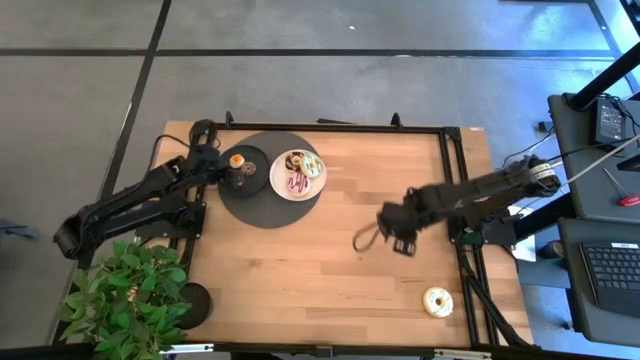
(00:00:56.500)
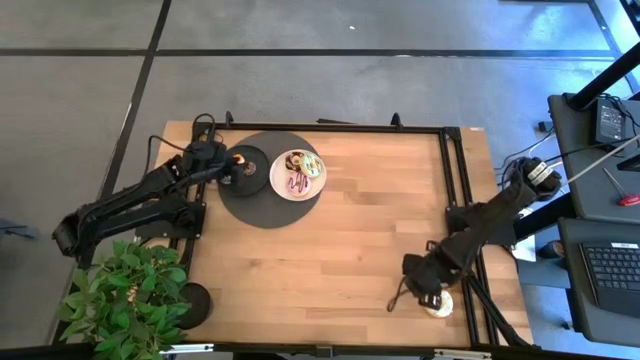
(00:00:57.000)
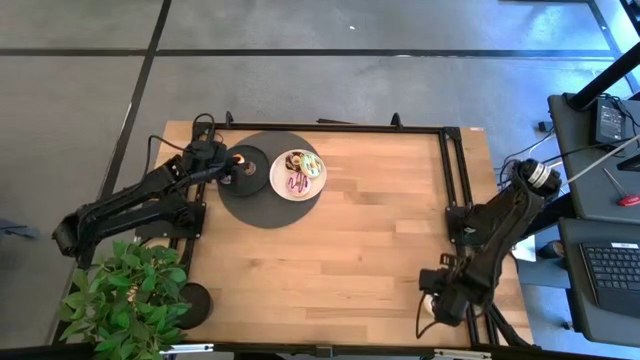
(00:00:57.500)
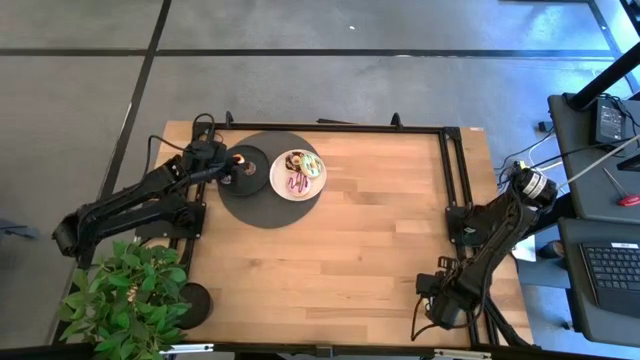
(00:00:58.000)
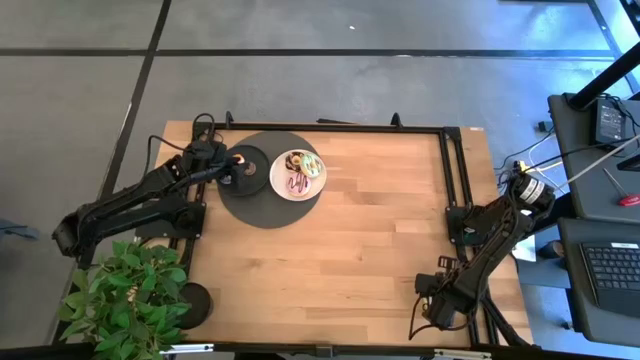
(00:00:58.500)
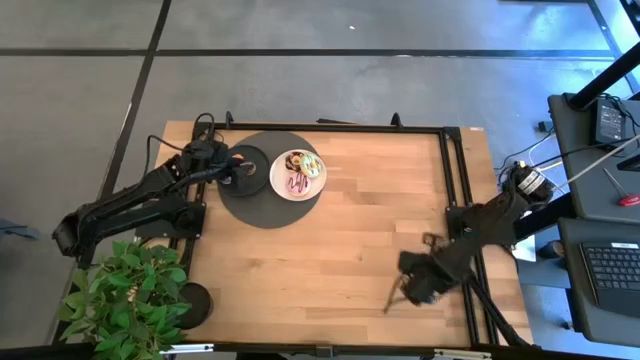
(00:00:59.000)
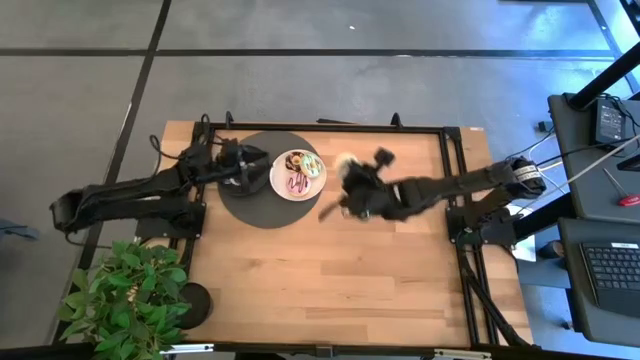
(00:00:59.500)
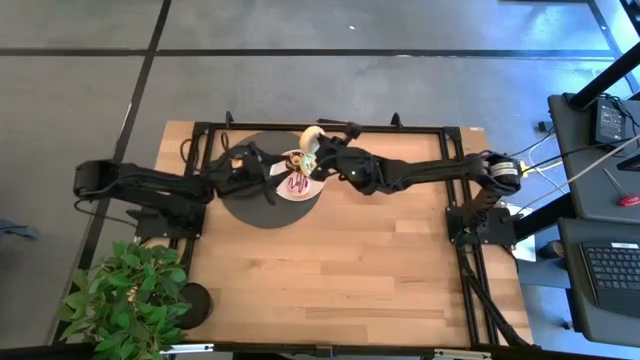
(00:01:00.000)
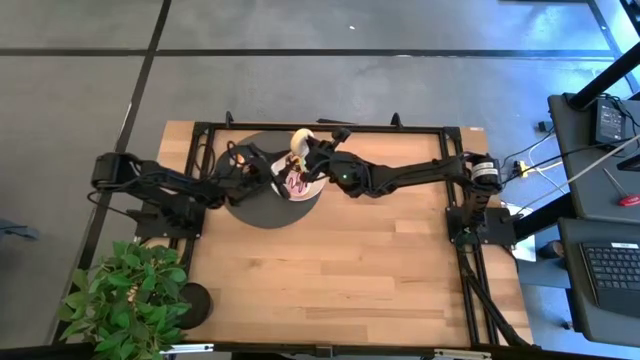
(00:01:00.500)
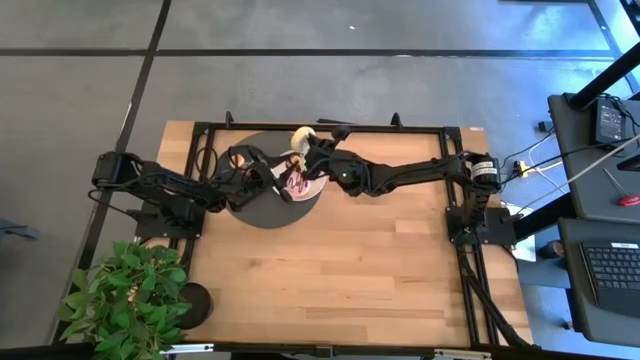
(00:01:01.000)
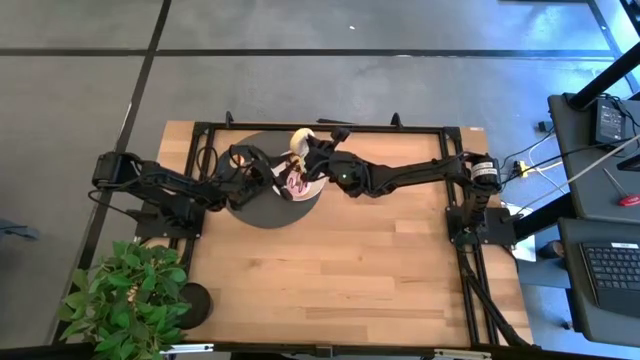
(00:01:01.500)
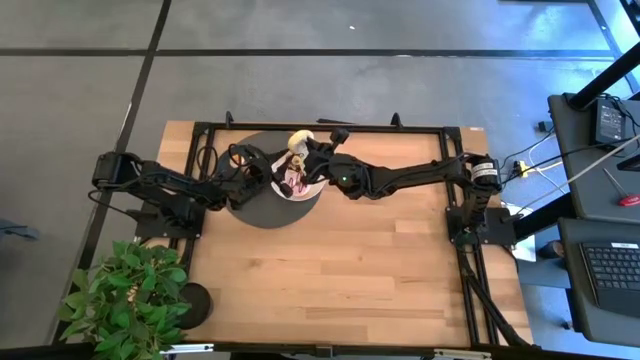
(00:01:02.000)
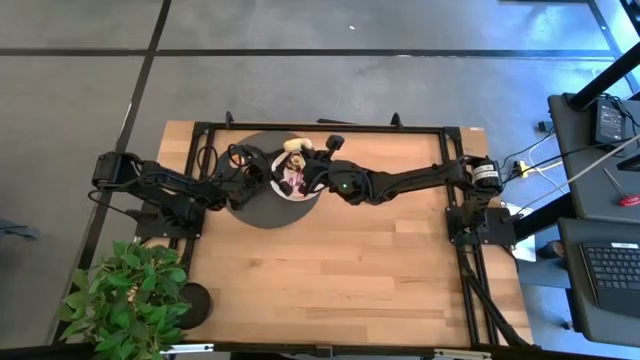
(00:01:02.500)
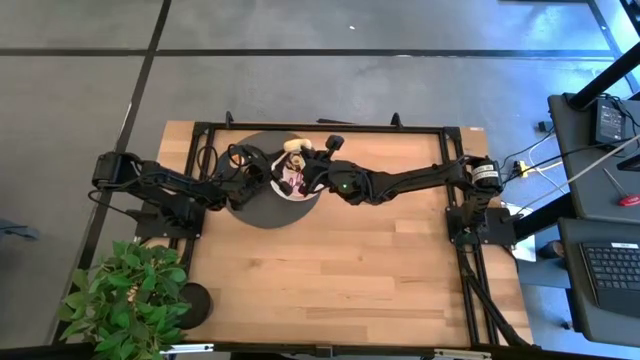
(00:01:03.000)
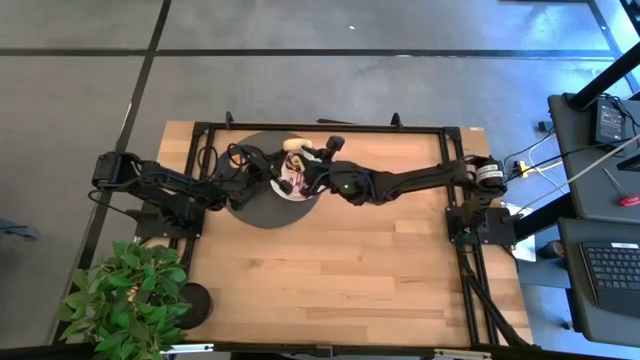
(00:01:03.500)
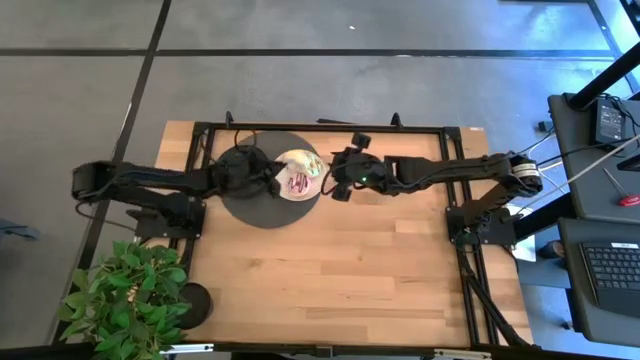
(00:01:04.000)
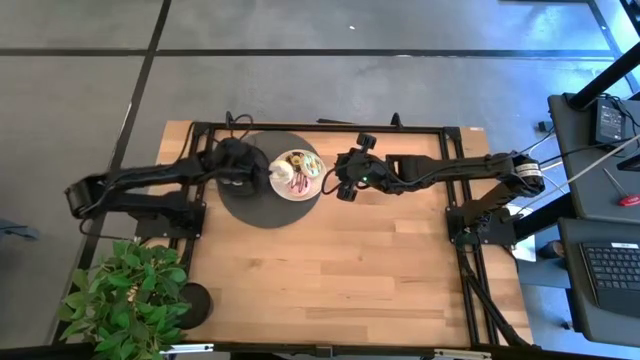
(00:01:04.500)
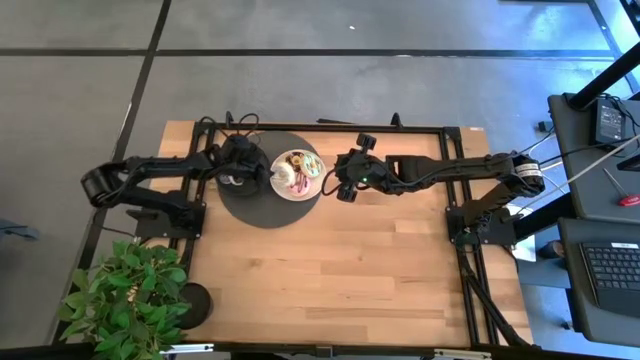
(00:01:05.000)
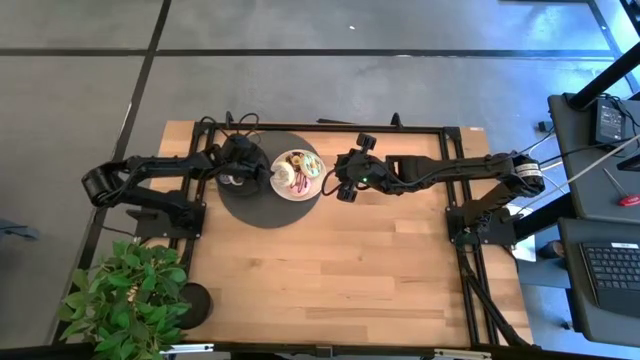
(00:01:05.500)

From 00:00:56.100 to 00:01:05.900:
Task: Pick & Place donuts
Put the big white donut on the white plate

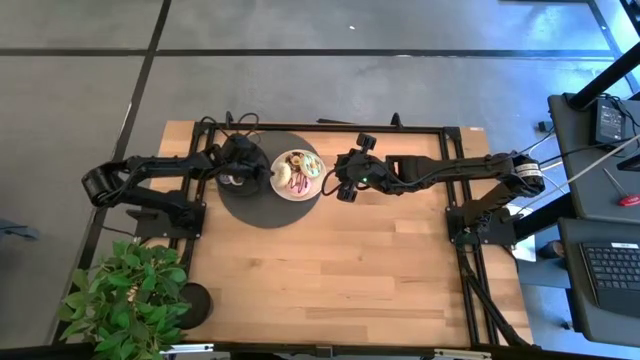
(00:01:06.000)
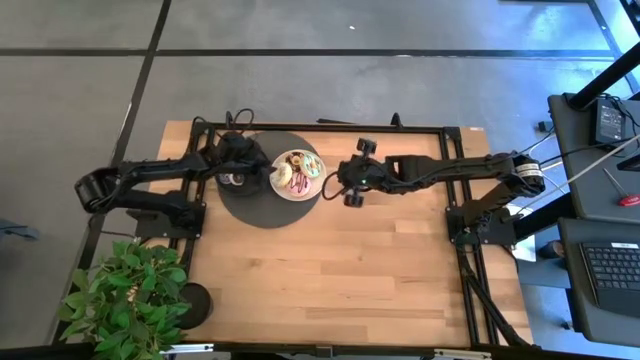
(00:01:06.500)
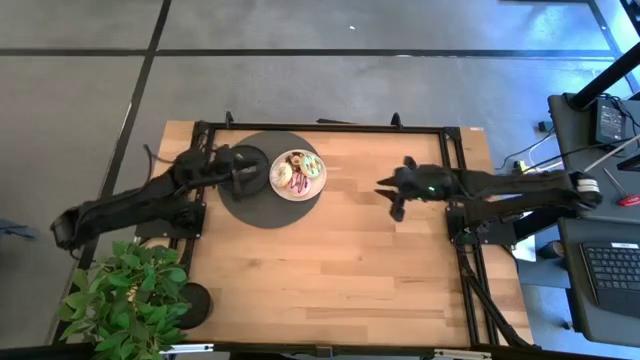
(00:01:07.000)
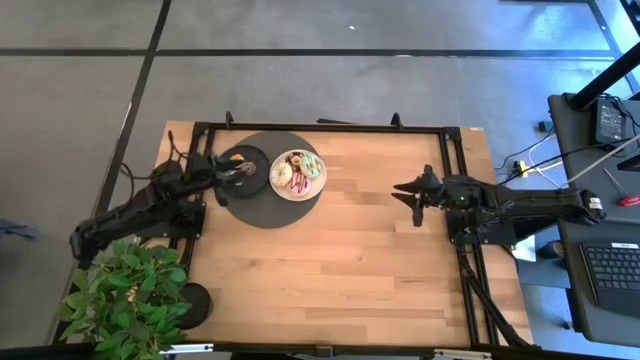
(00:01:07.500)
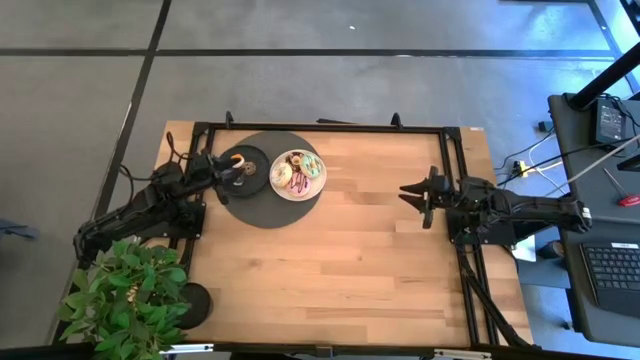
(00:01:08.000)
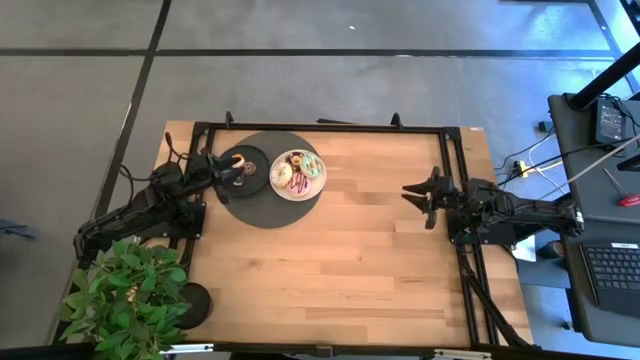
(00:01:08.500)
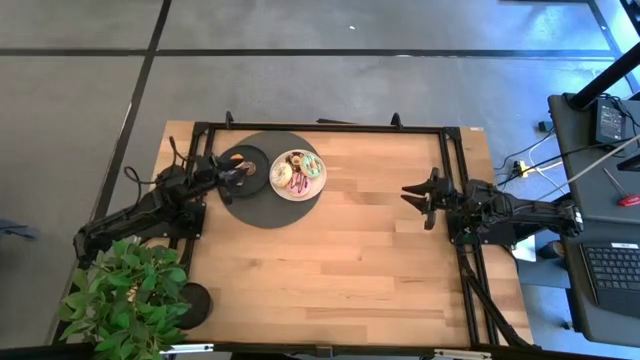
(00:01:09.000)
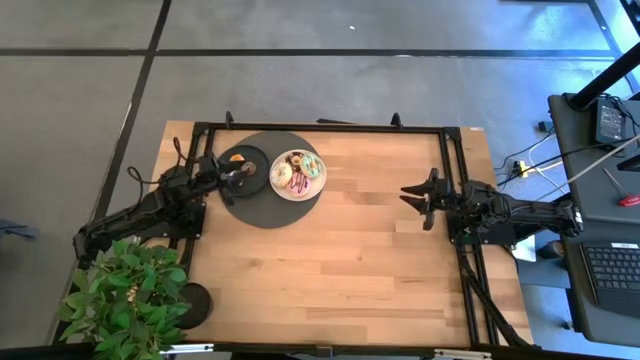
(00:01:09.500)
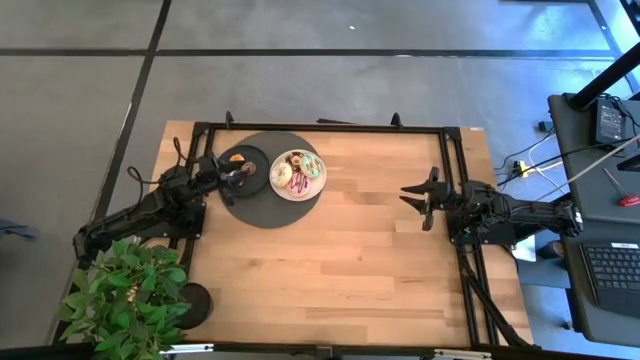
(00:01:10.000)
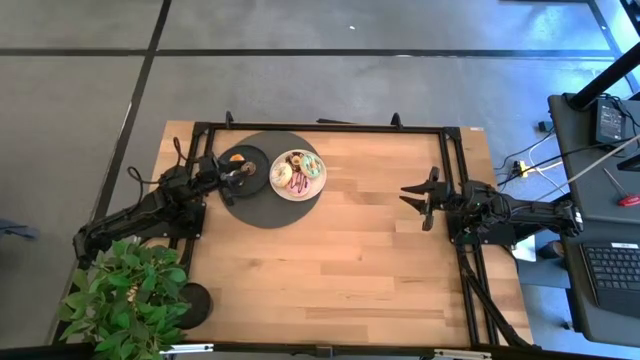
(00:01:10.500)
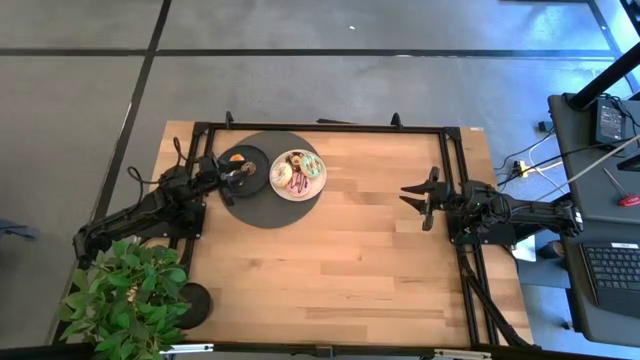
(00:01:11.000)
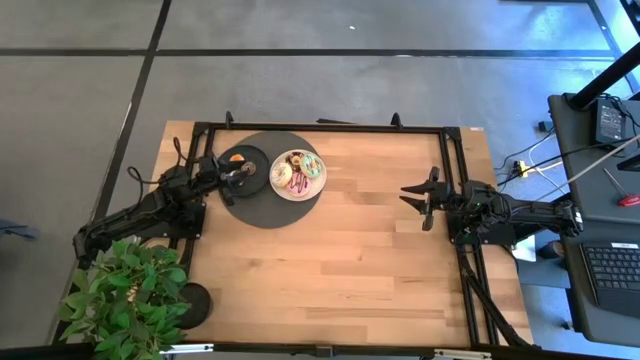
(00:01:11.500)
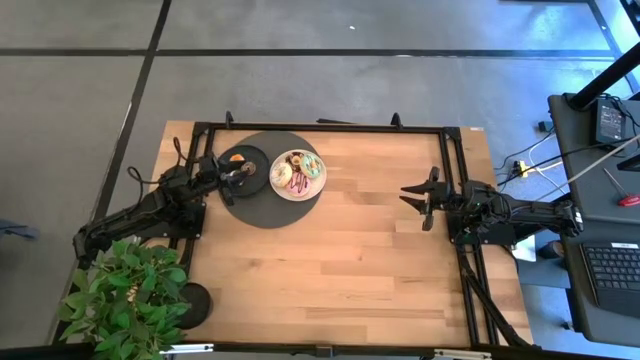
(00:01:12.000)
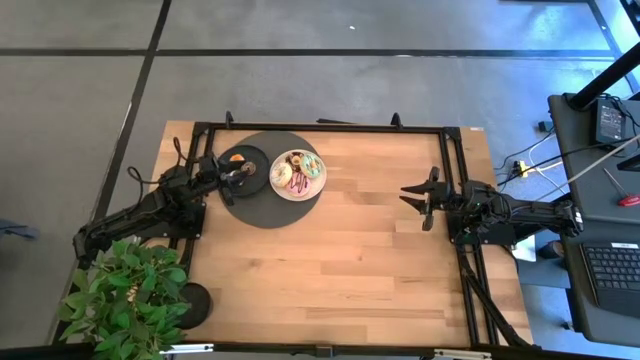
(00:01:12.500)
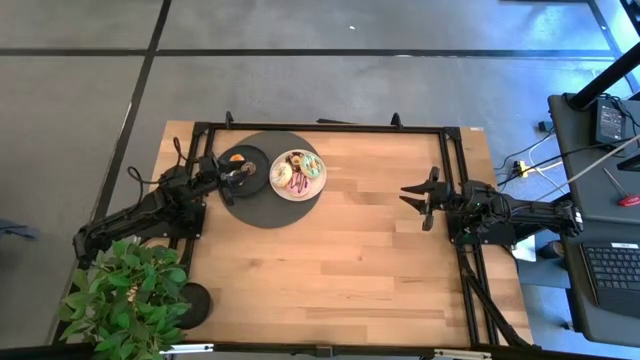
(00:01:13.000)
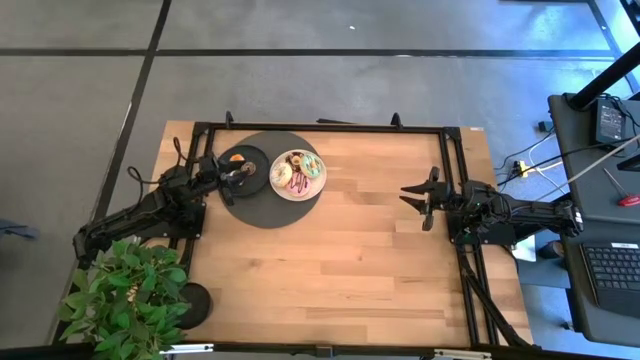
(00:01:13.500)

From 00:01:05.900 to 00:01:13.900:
Return to Home Position

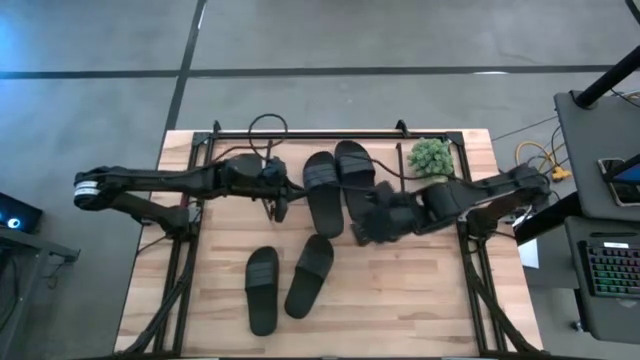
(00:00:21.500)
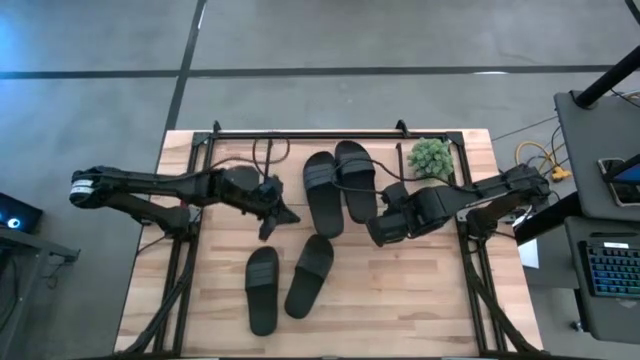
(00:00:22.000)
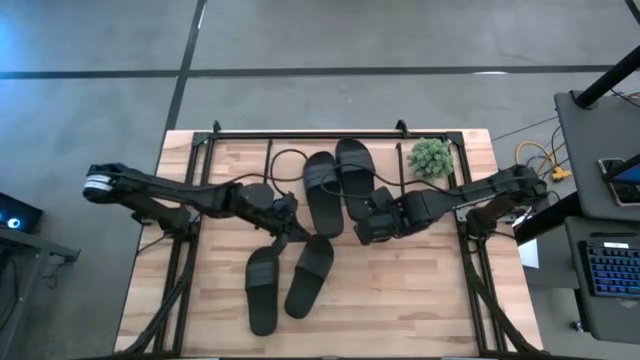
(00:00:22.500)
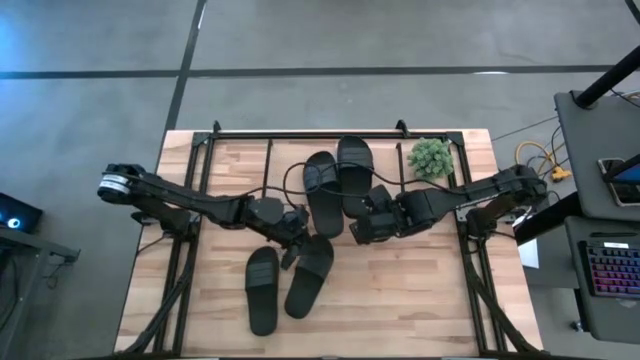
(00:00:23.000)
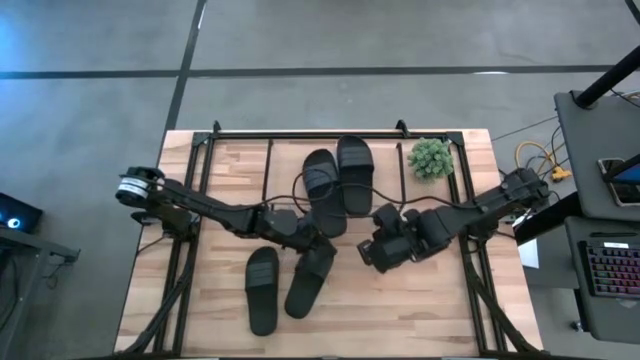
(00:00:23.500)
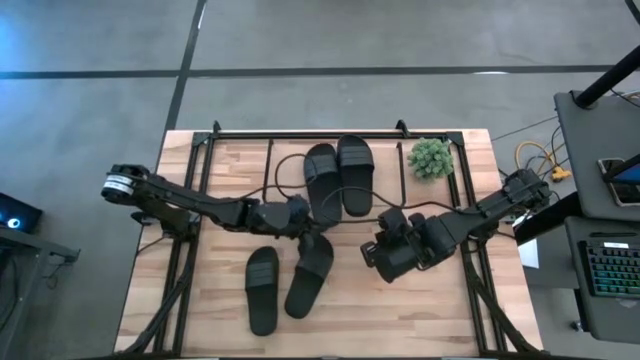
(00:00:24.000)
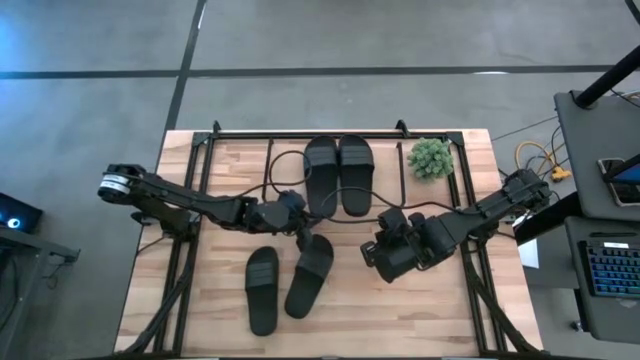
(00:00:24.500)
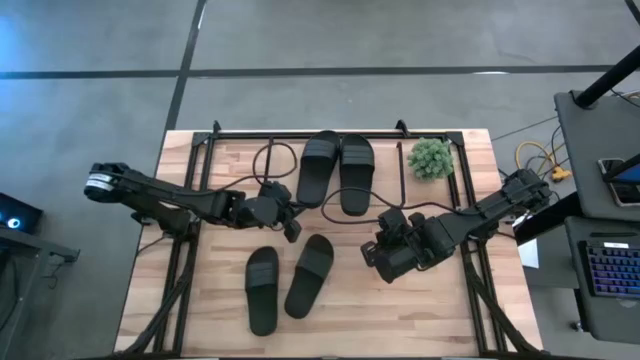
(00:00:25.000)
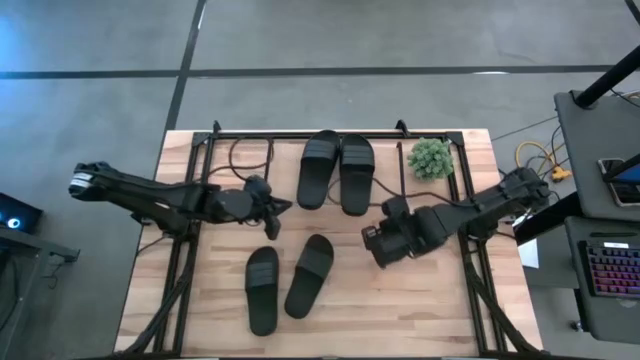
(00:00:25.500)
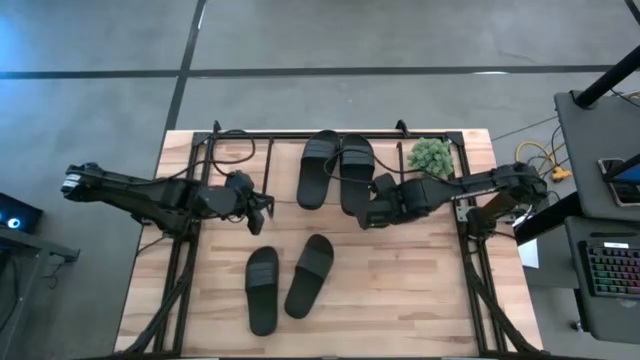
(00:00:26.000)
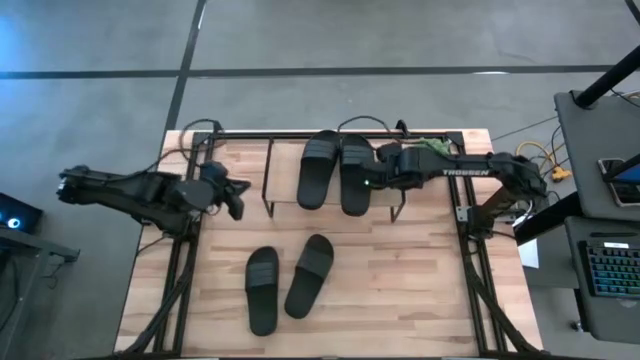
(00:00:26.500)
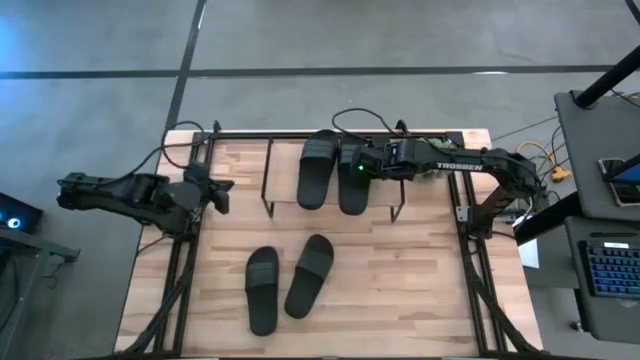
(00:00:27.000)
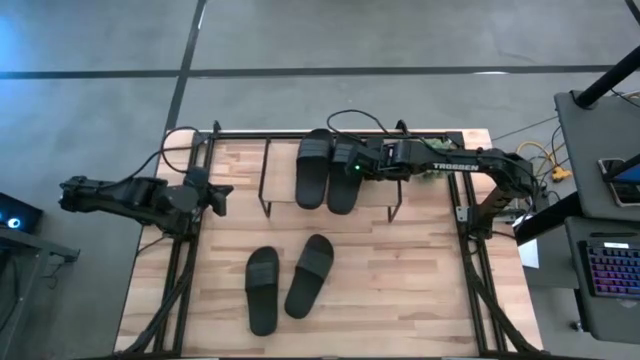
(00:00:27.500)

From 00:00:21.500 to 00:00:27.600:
Task: Pick and place slides into the shelf
Adjust the black slides on the shelf
